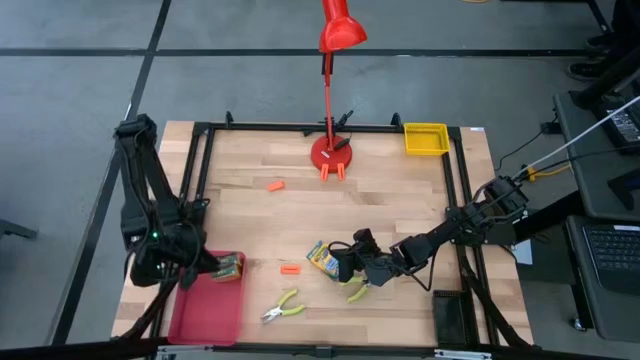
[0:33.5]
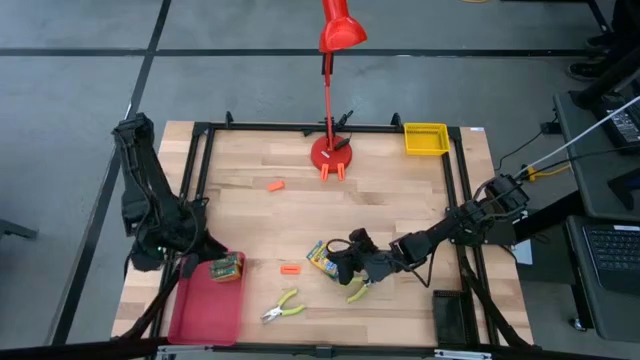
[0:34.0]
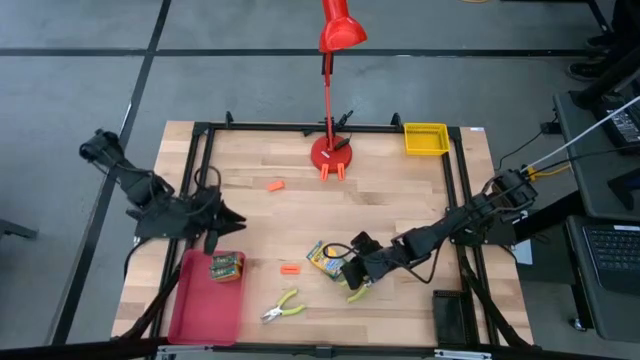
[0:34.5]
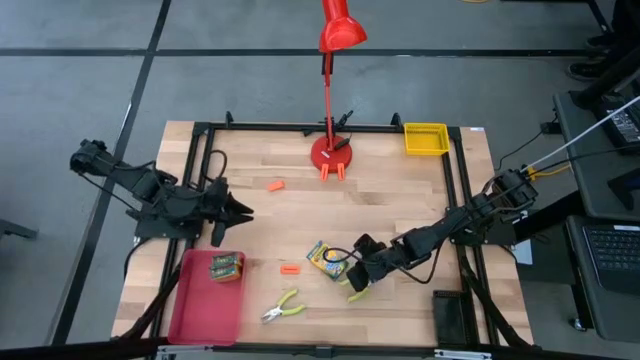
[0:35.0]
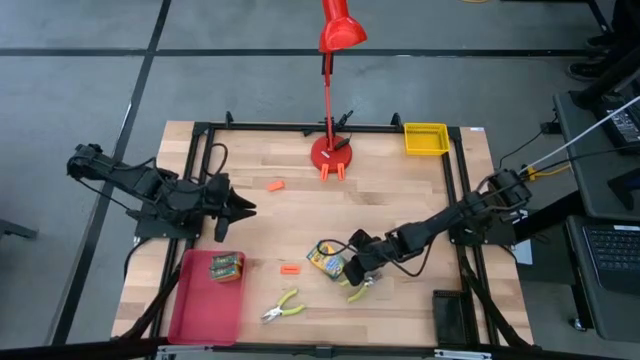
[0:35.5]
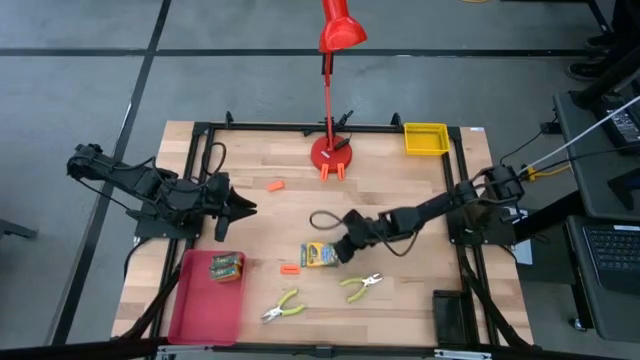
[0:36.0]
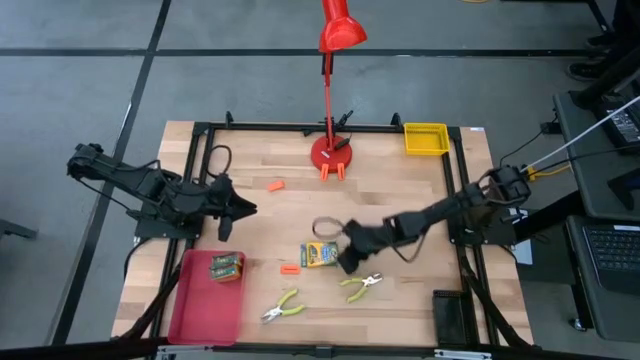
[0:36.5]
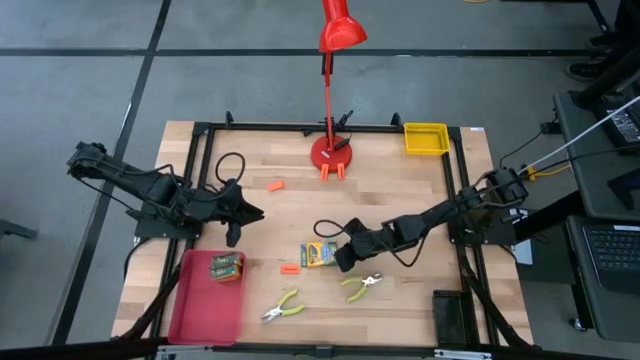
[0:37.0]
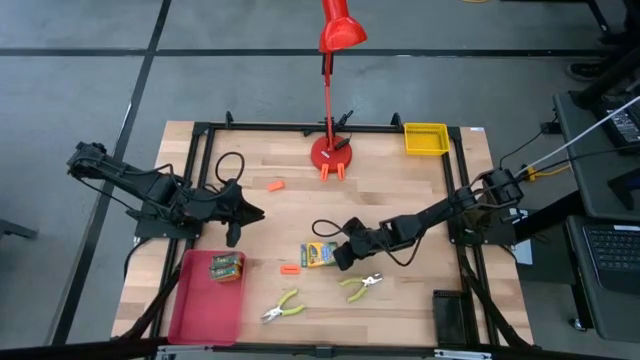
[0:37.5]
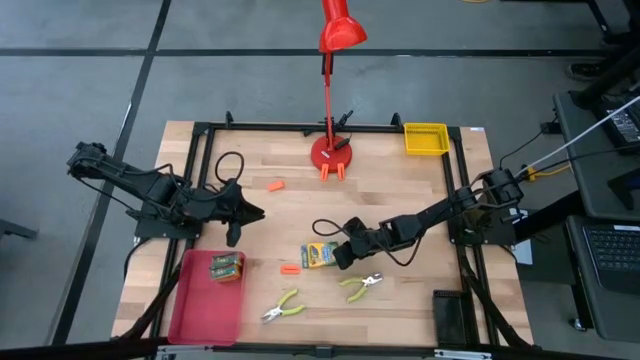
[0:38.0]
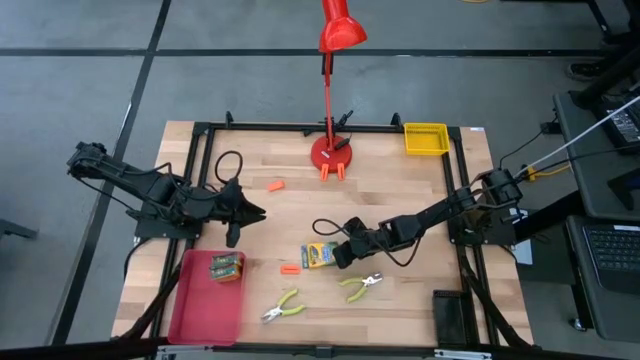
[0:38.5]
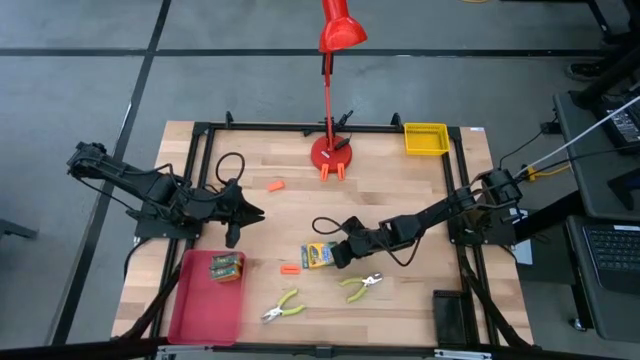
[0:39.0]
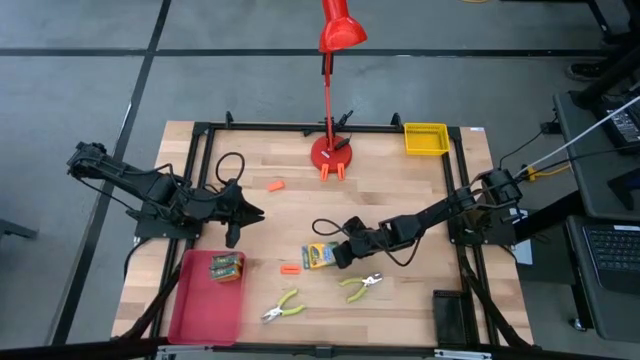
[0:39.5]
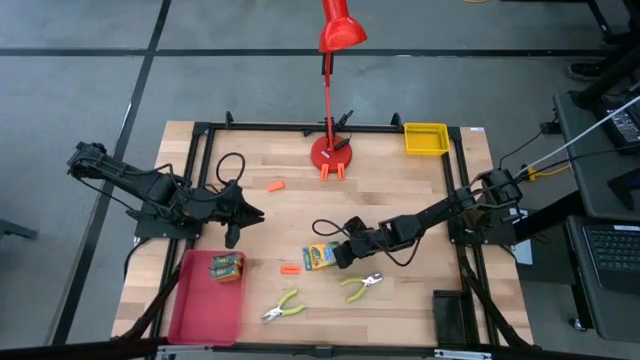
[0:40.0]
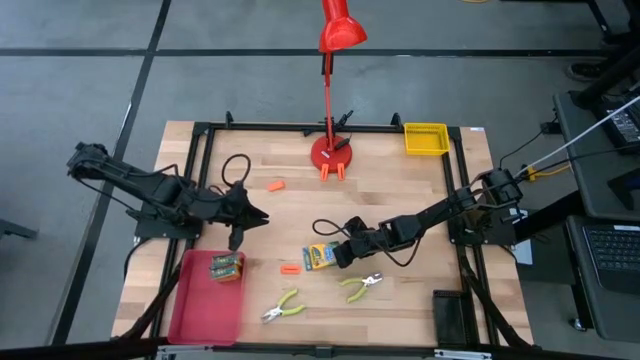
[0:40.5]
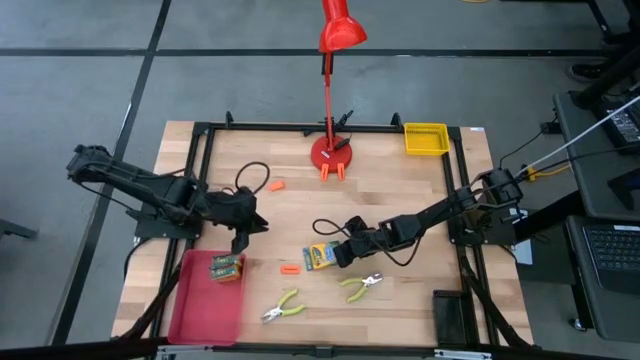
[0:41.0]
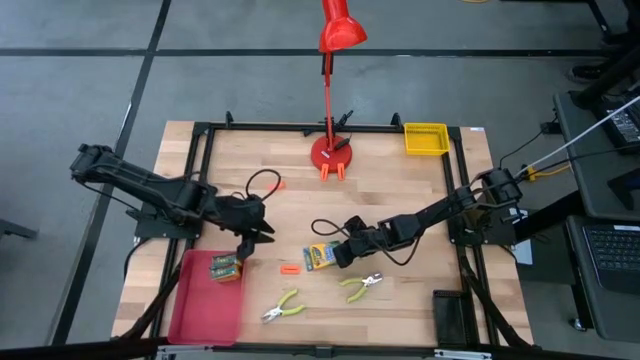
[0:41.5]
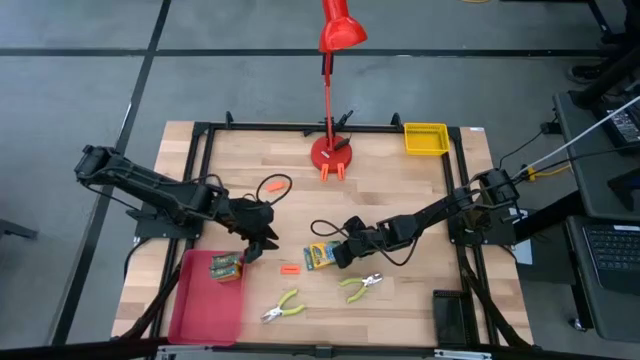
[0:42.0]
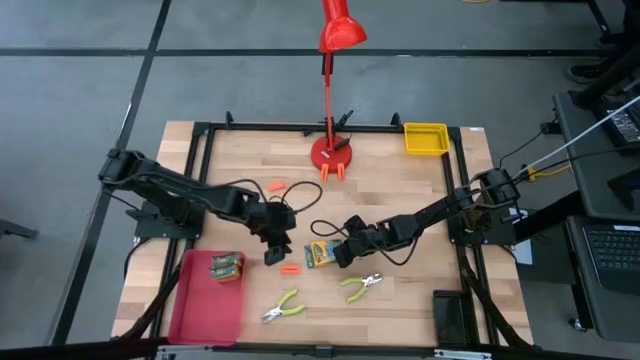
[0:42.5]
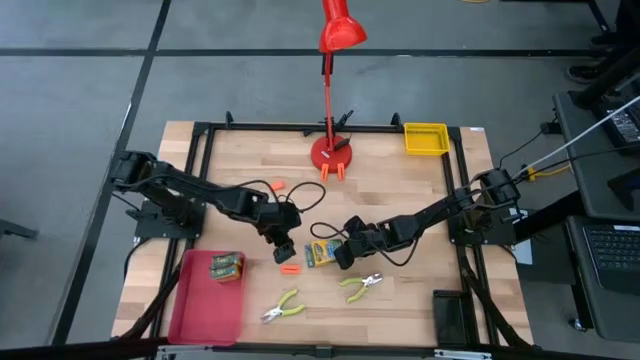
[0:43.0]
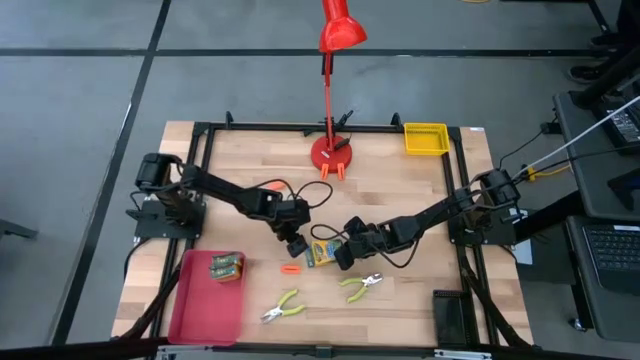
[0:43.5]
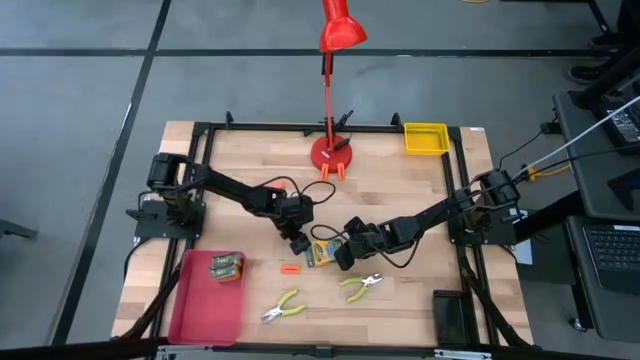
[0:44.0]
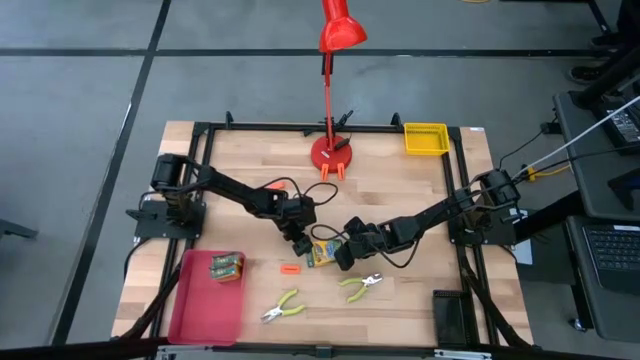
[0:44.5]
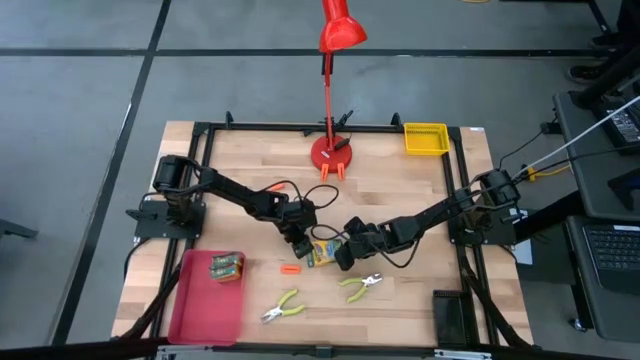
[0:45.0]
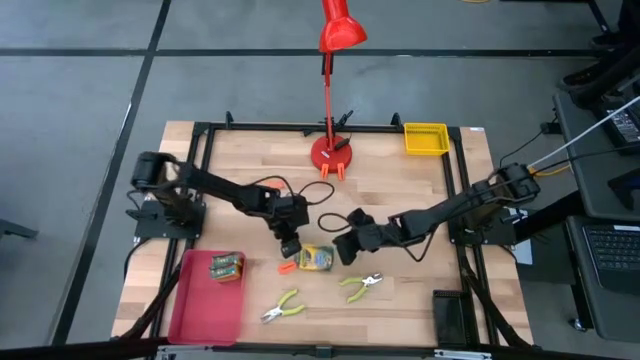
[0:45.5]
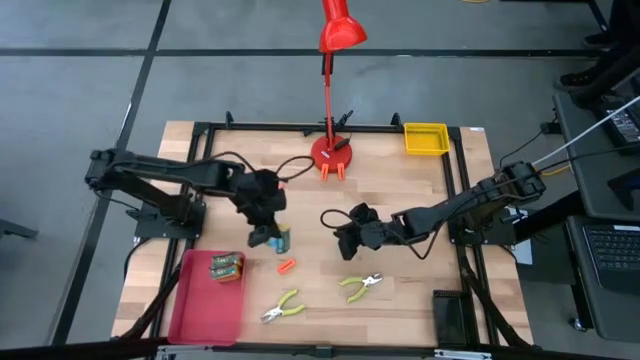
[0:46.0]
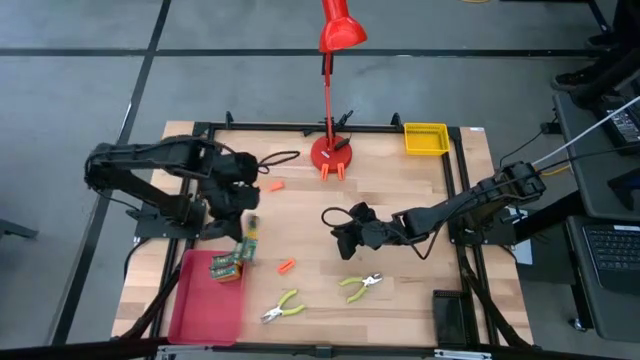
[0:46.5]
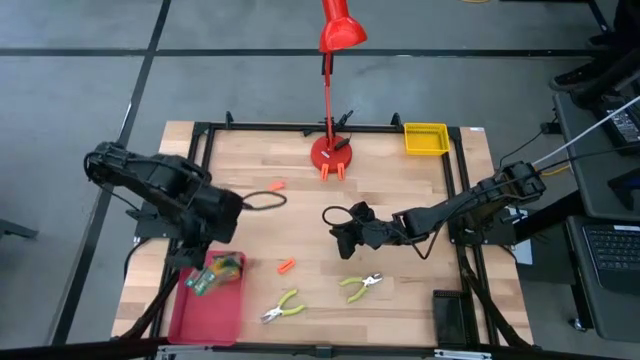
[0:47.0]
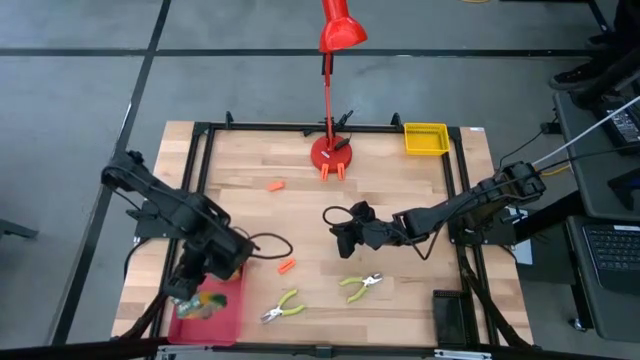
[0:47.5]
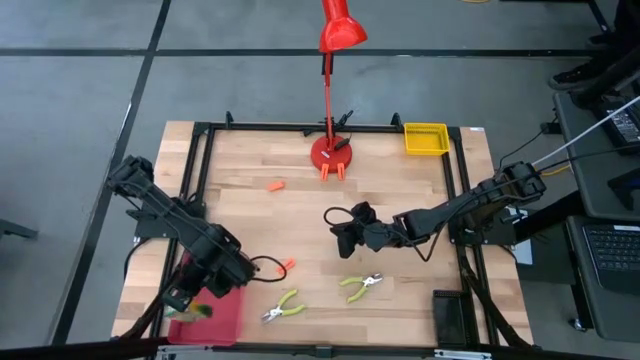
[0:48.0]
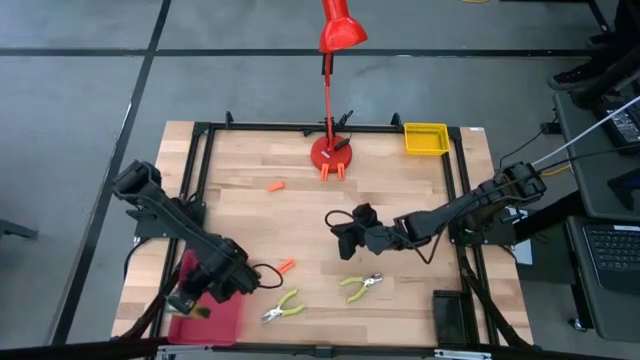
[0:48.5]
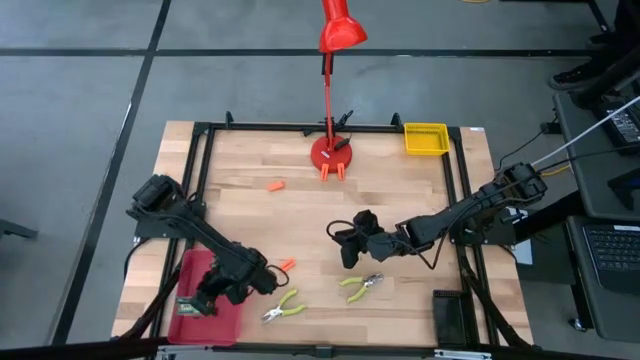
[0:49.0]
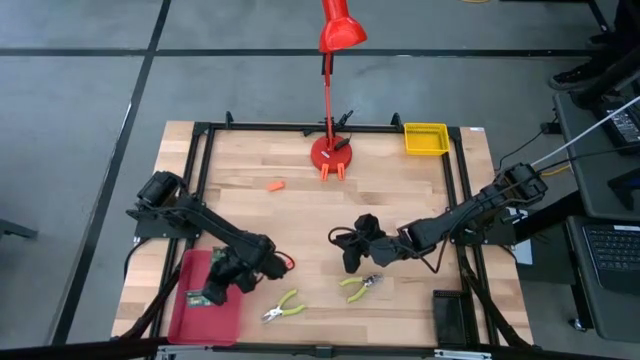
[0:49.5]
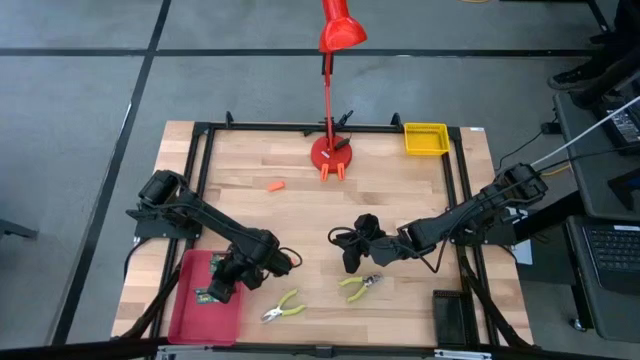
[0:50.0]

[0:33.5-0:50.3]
Task: Pick & Place School Supplies
Put the yellow crayon box into the red bin

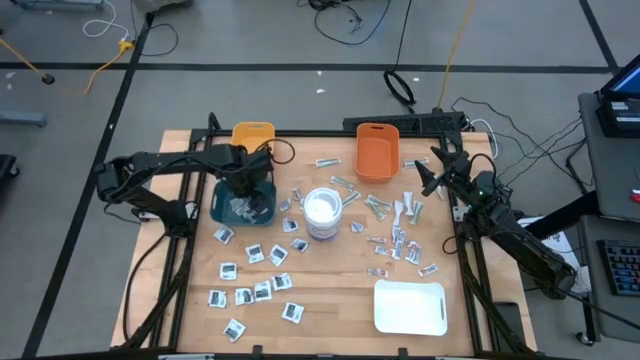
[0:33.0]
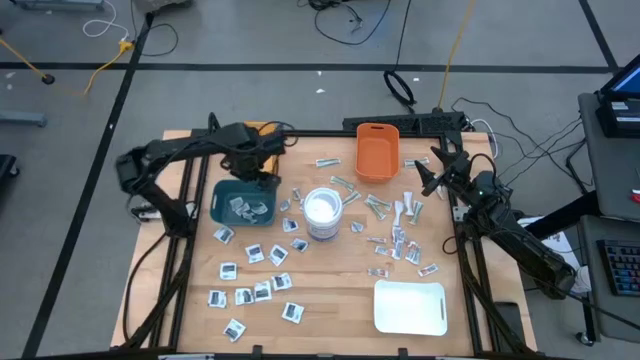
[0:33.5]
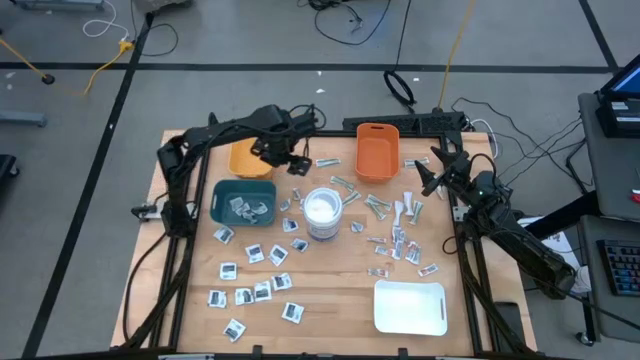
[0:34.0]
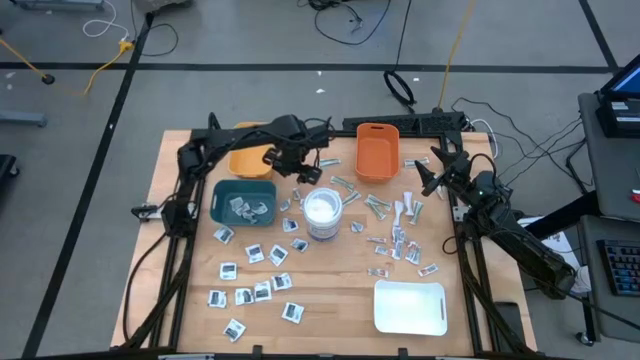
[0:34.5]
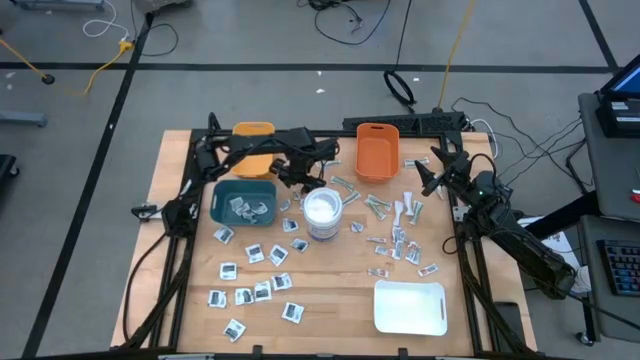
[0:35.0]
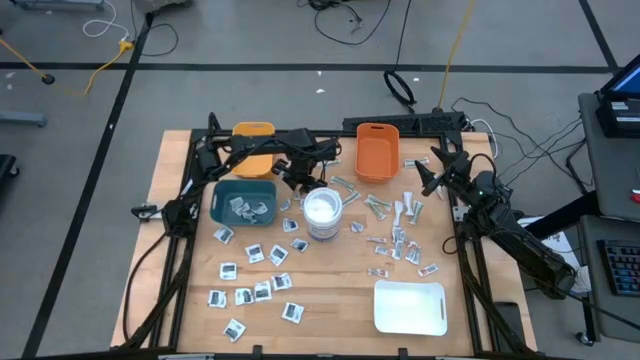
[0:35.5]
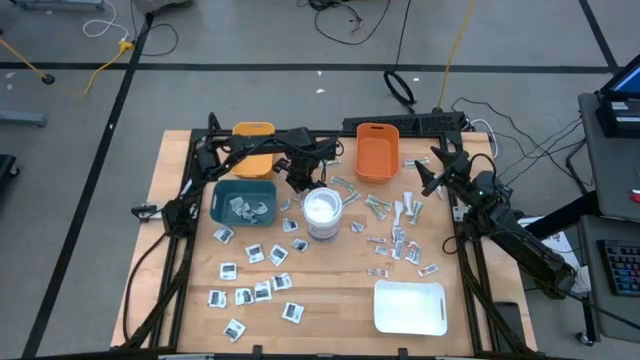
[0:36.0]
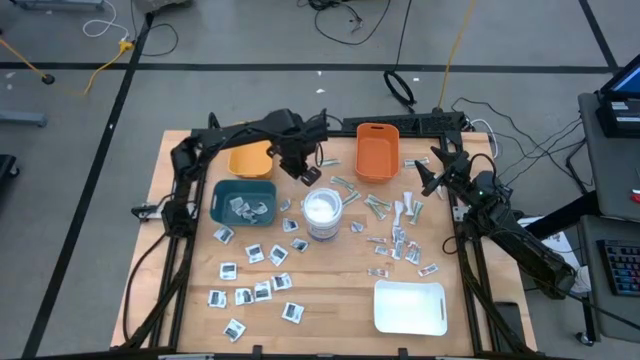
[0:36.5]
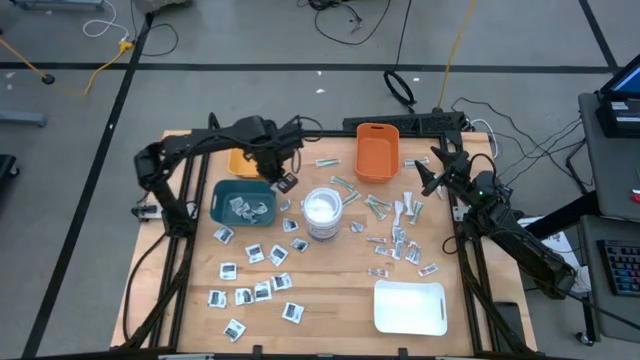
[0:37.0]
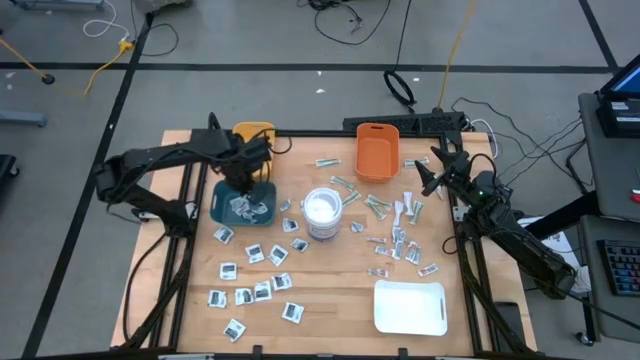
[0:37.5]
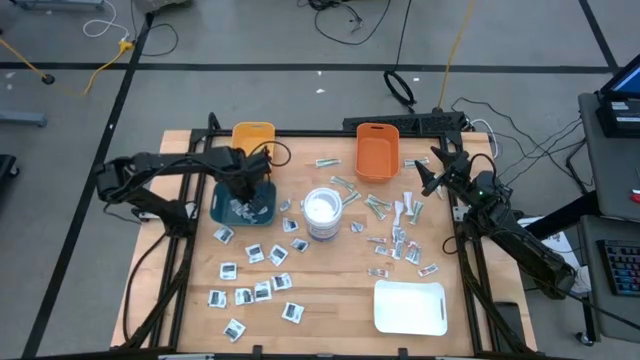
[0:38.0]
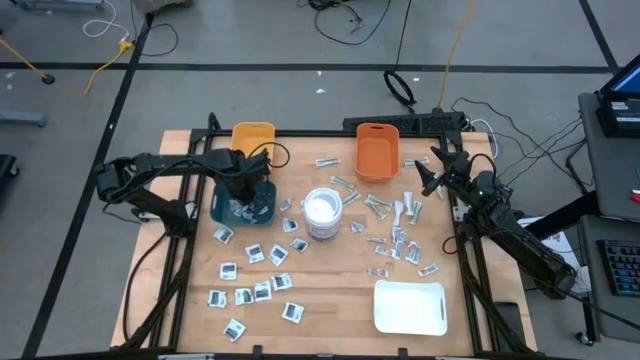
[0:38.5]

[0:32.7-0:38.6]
Task: Pick & Place First Aid Supplies
Put the blue pad into the blue bin
